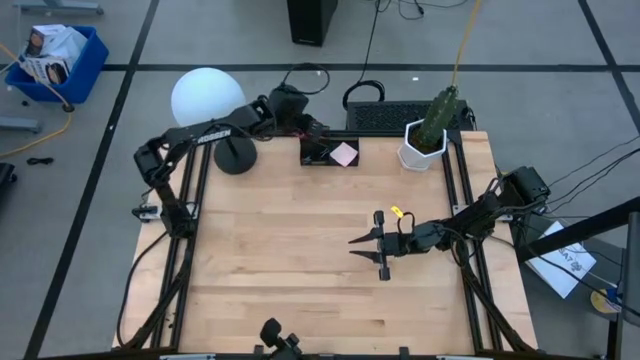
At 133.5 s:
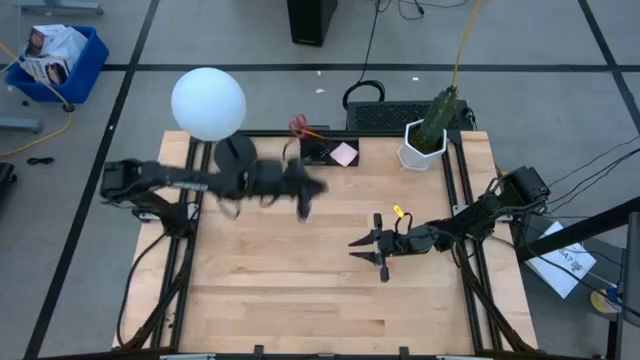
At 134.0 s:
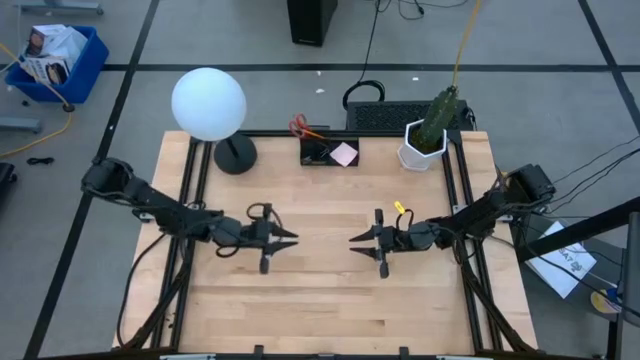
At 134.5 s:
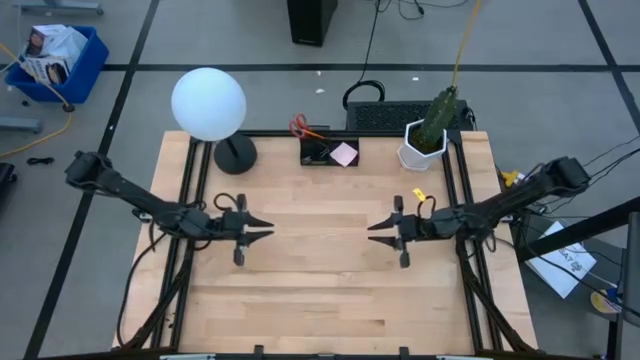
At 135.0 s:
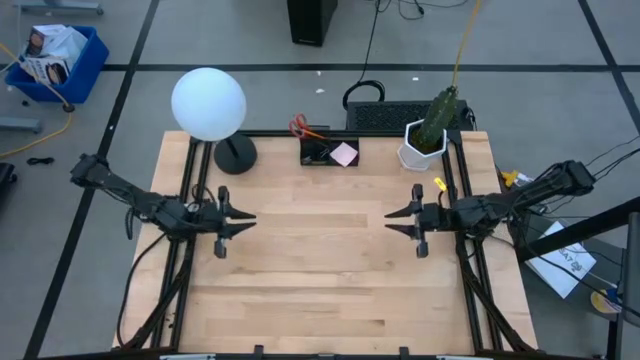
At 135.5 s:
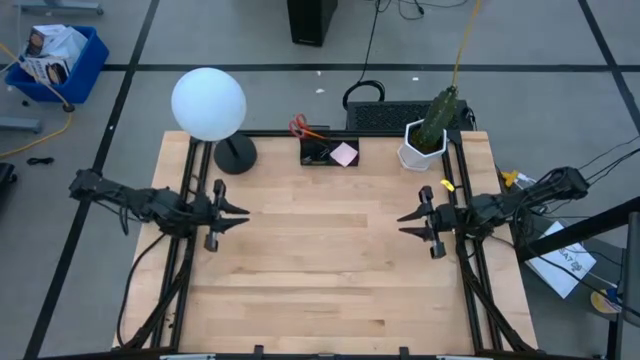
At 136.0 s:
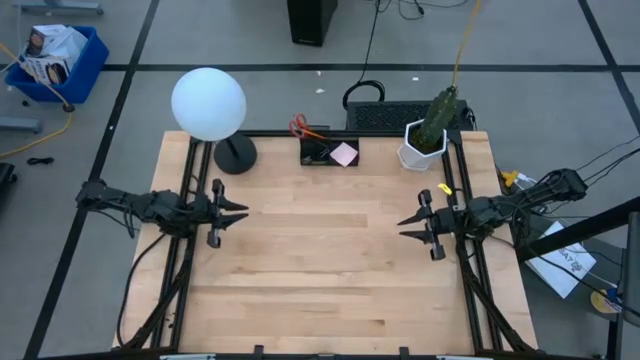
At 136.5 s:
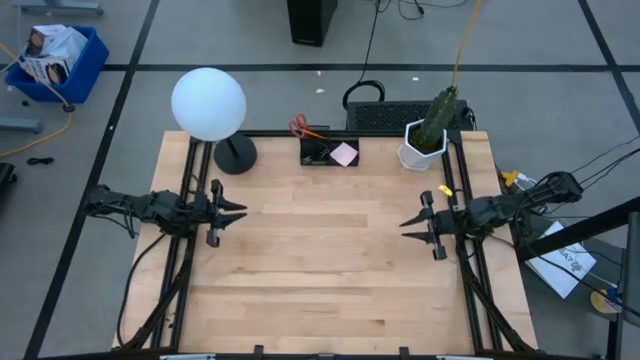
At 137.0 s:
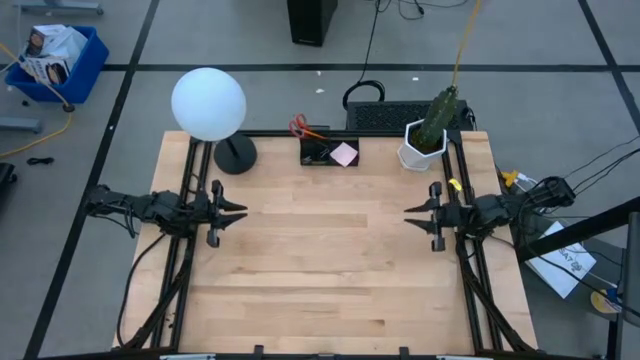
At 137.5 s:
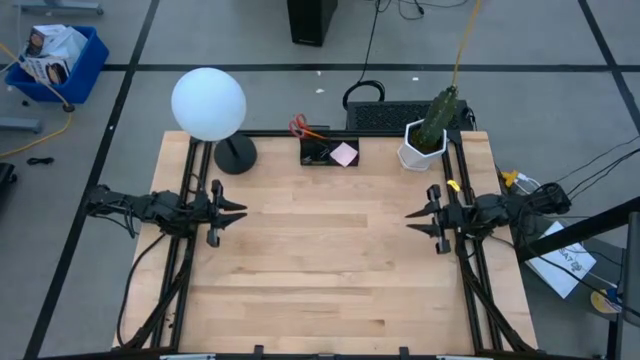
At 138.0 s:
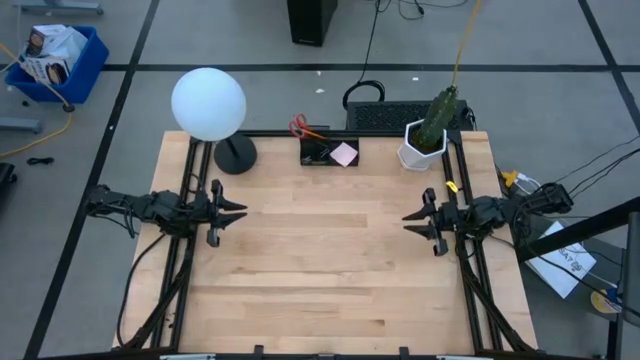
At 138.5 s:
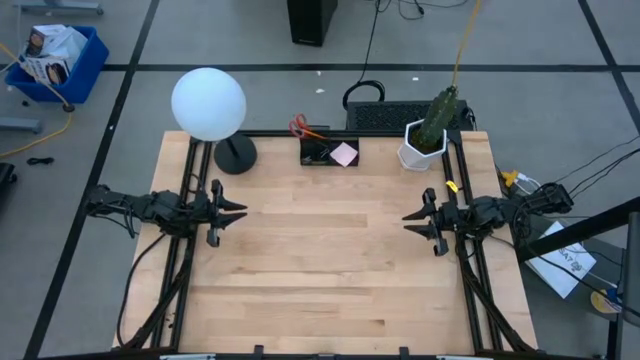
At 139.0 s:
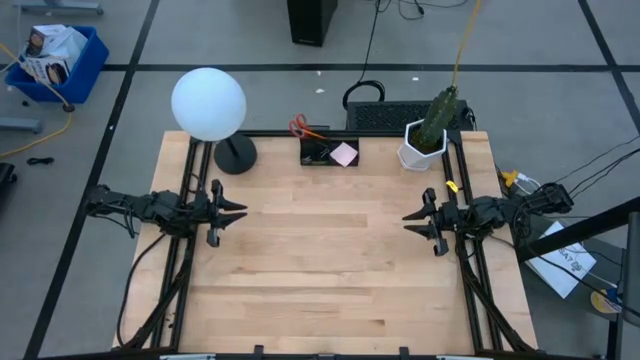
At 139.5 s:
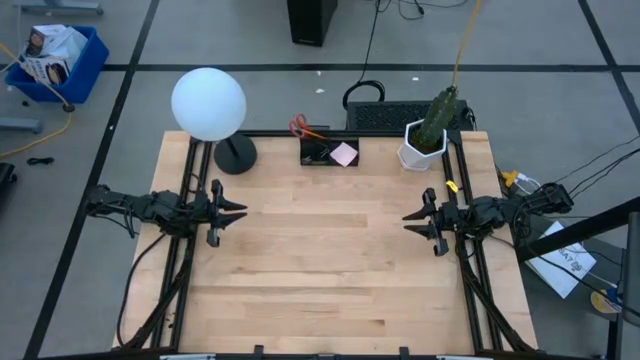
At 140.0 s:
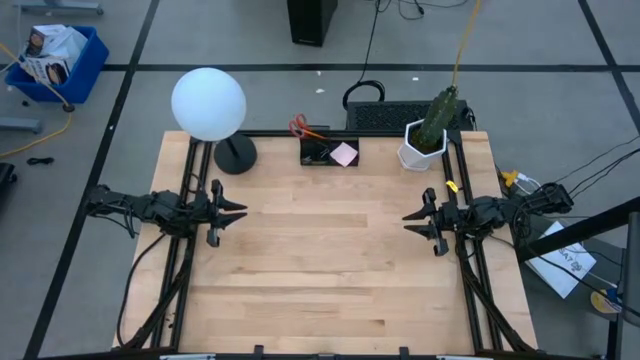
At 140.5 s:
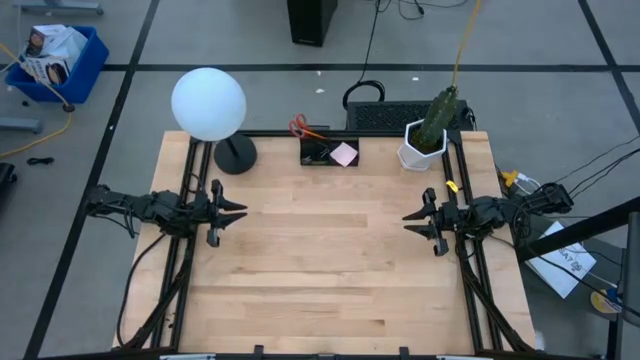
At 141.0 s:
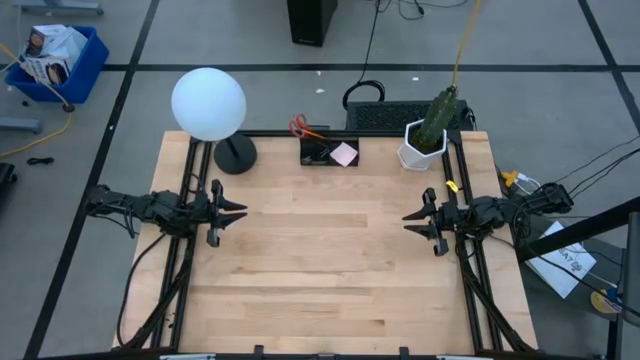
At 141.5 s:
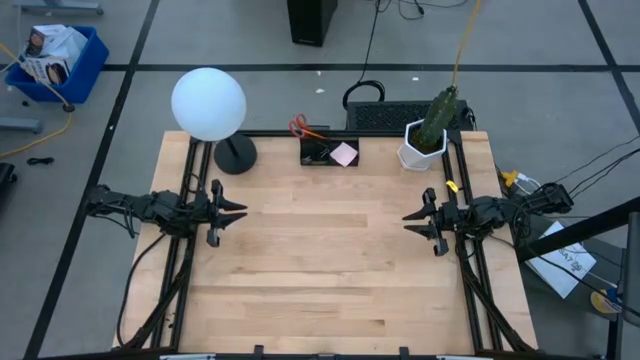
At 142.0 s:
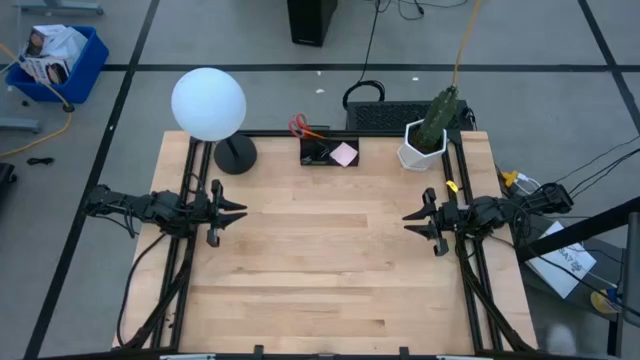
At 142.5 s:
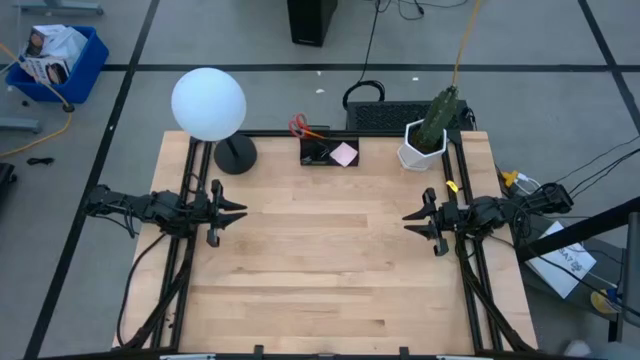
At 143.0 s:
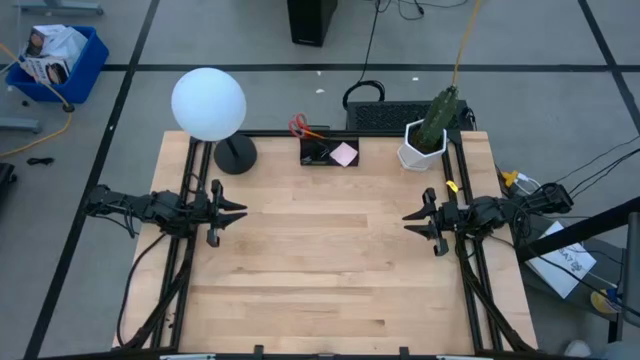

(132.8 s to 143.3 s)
Task: Pick and place office supplies into organizer
Return to Home Position

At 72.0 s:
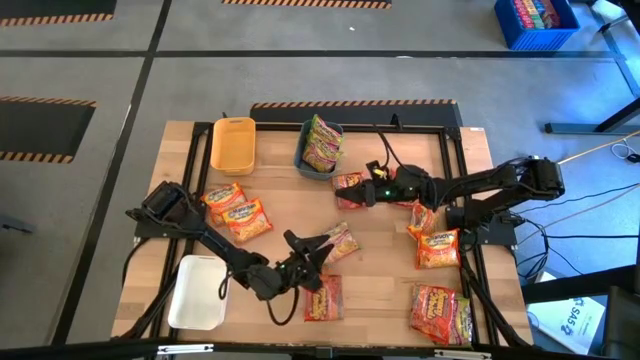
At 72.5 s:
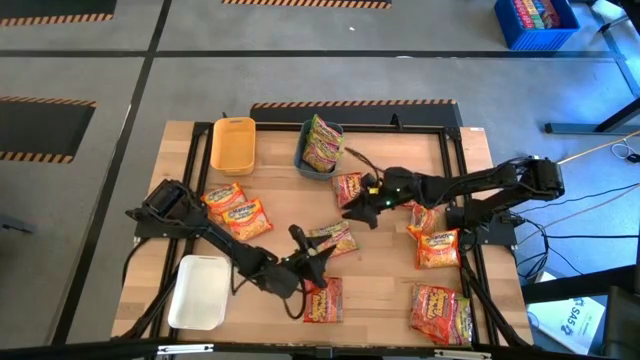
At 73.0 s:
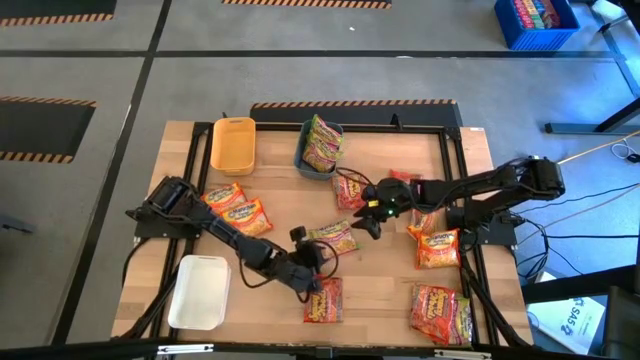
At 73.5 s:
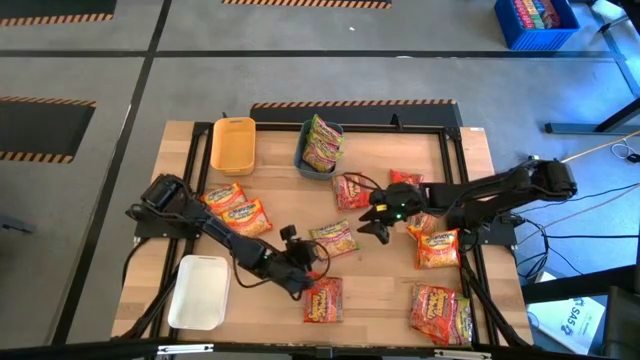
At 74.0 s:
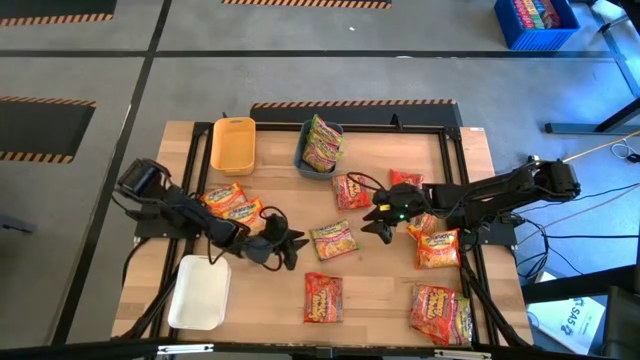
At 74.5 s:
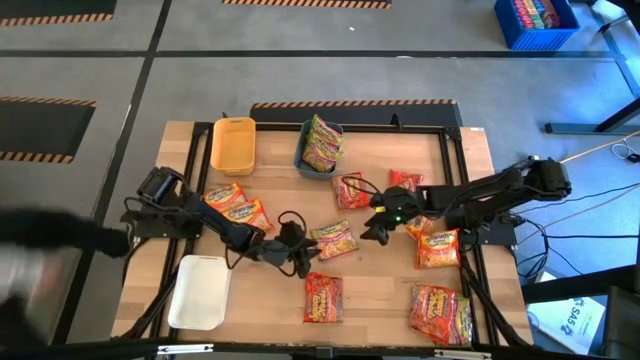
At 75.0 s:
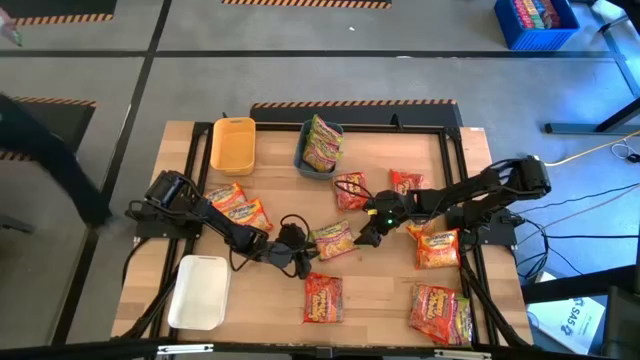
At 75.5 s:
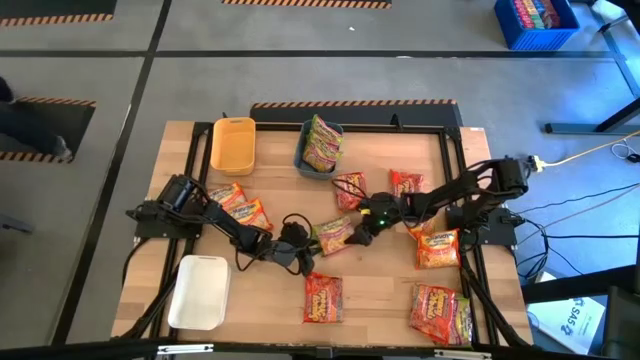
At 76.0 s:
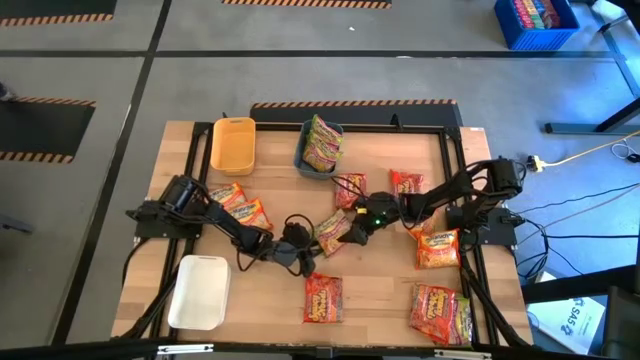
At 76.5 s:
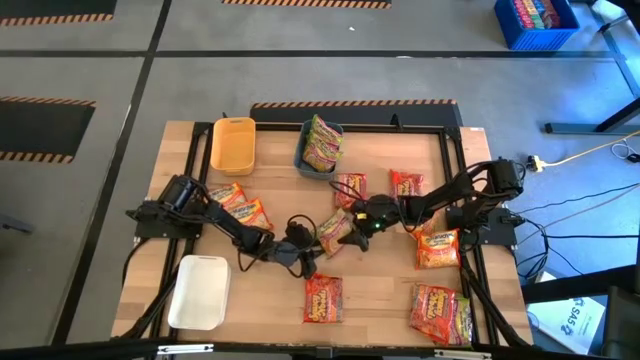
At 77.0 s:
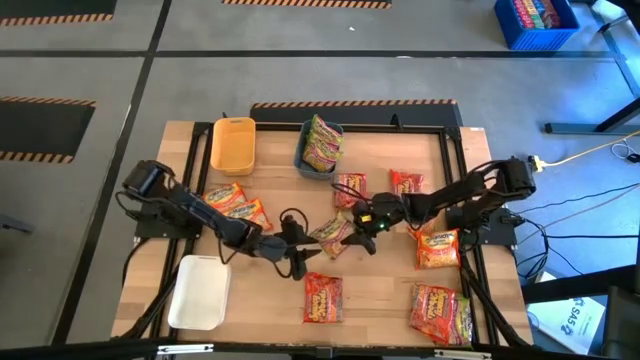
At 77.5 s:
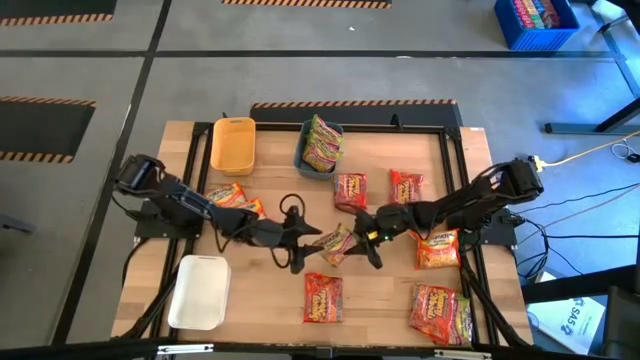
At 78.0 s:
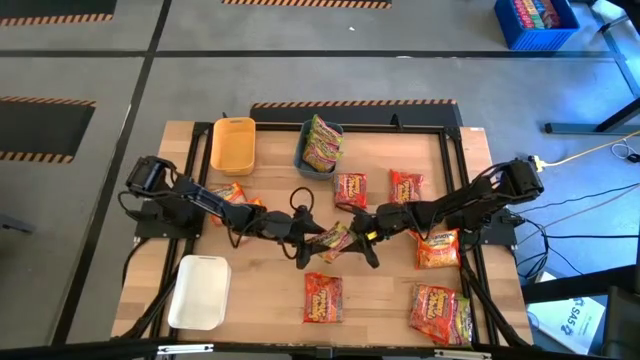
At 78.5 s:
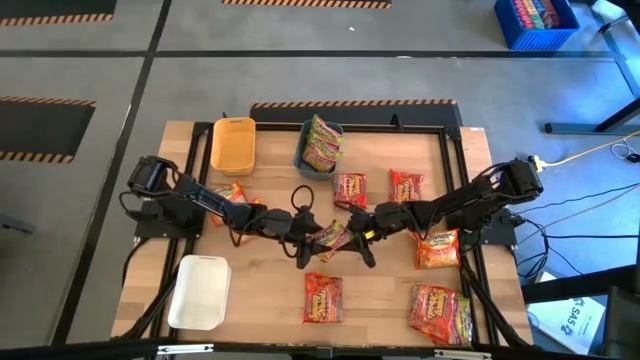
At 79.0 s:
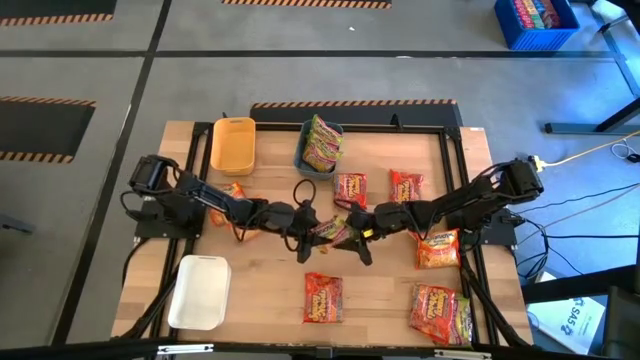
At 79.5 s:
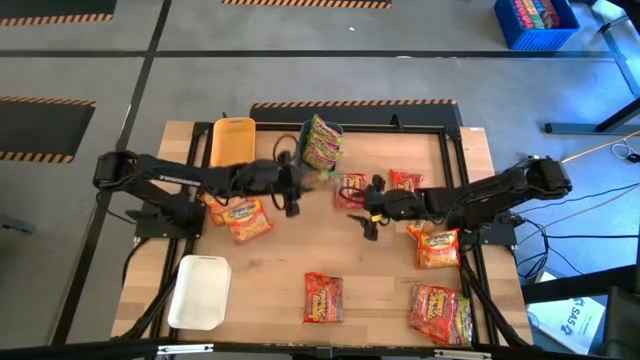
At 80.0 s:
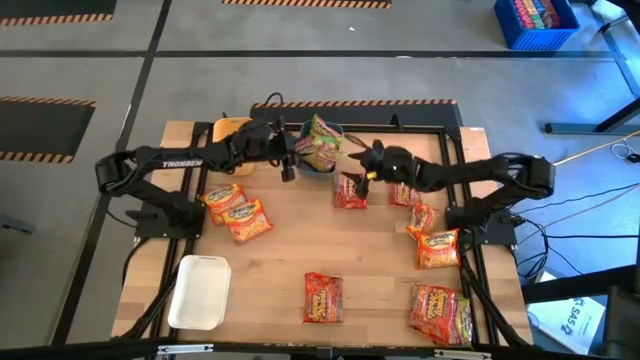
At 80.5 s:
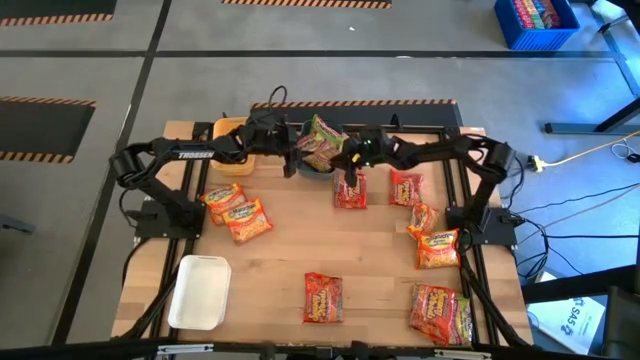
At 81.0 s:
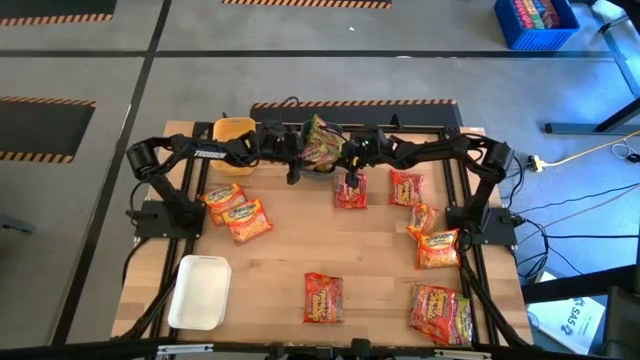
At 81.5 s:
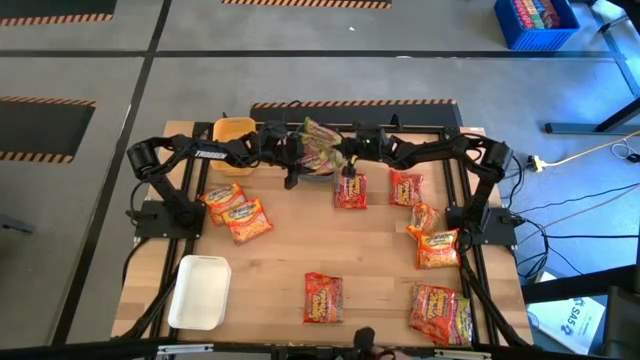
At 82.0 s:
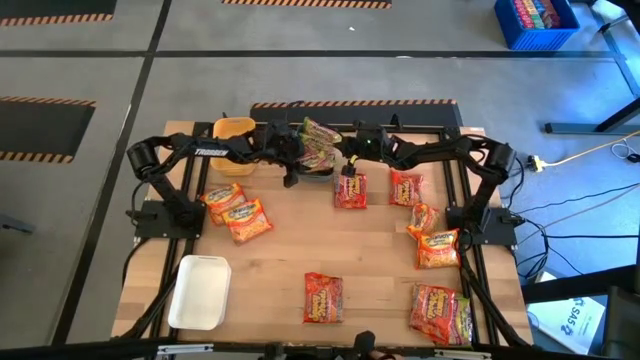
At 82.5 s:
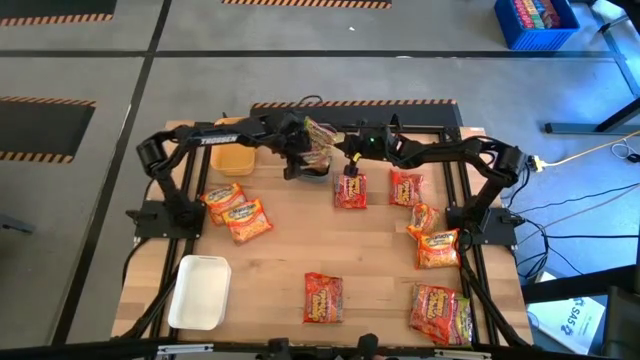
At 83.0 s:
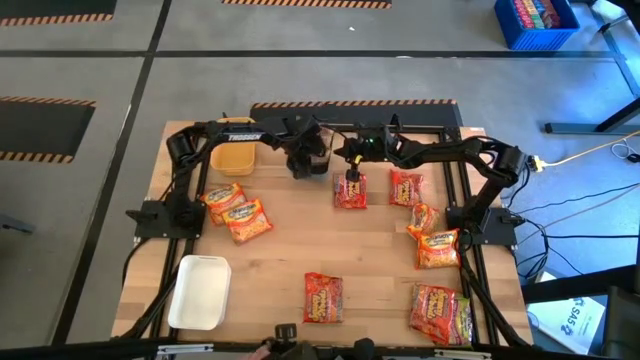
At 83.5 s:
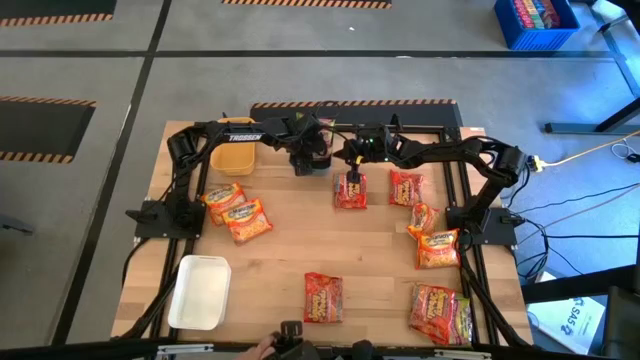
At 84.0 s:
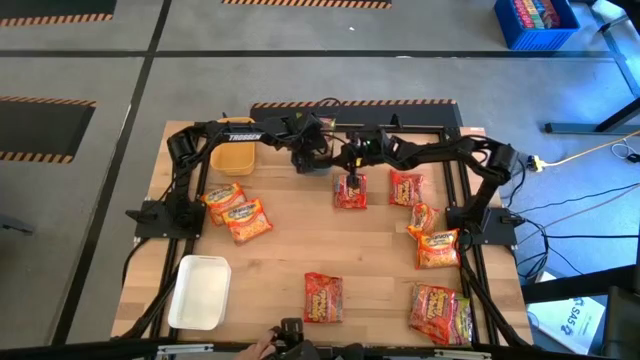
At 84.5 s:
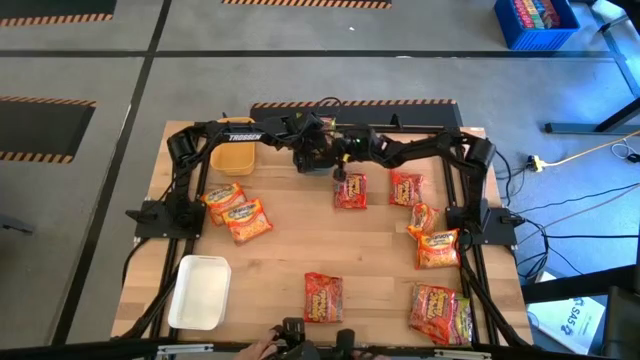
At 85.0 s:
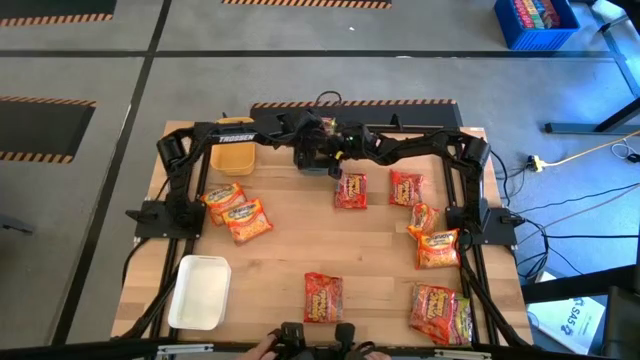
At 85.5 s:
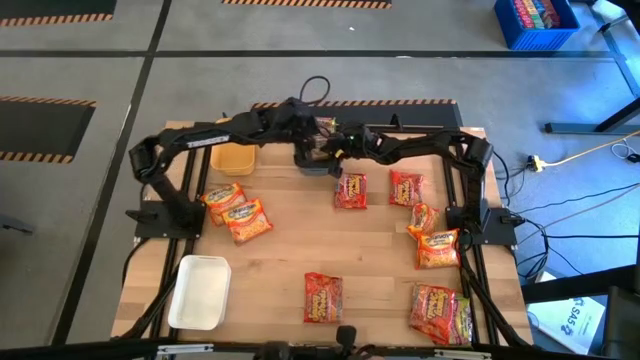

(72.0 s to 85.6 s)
Task: Sort Maruchan noodles
Put the green noodle pack into the blue bin
